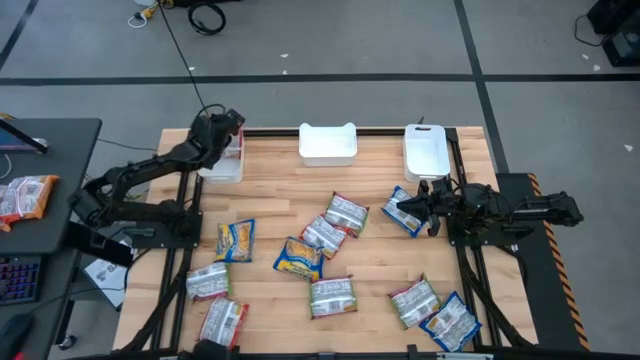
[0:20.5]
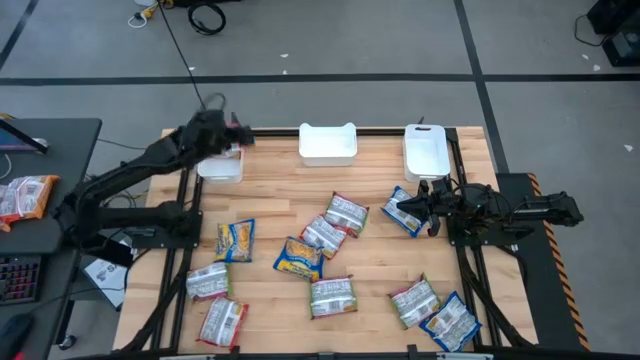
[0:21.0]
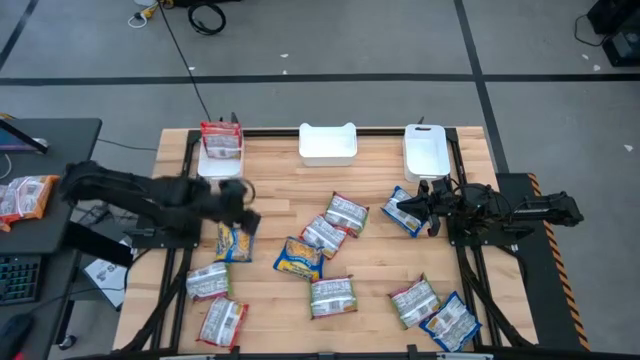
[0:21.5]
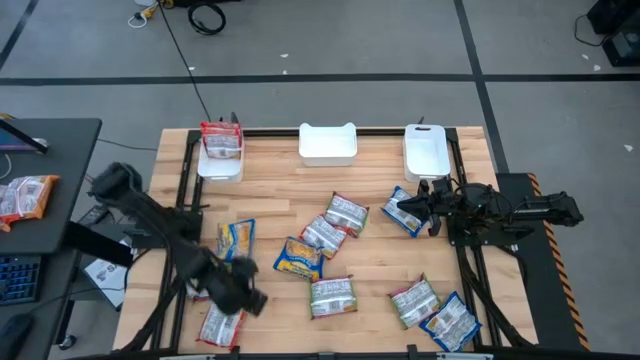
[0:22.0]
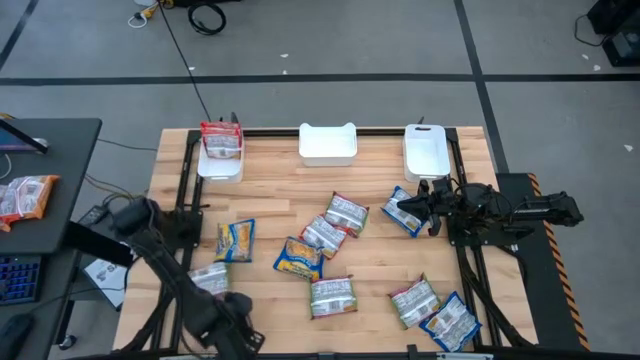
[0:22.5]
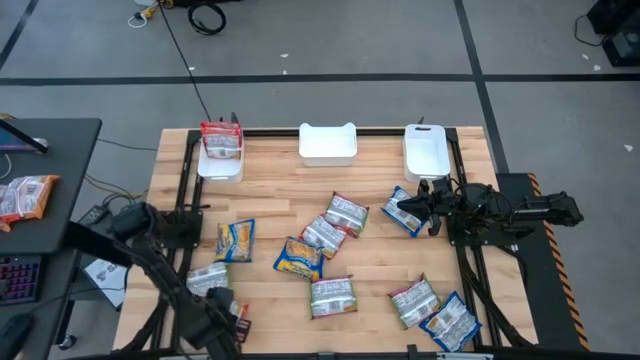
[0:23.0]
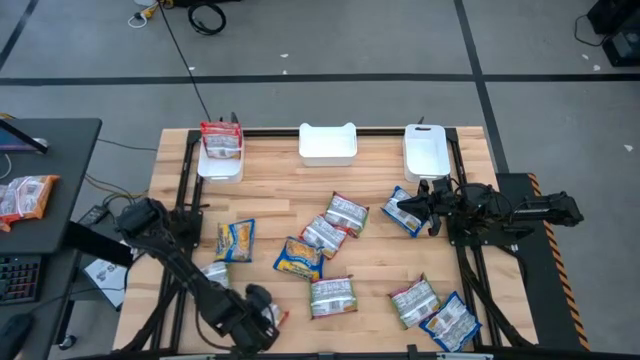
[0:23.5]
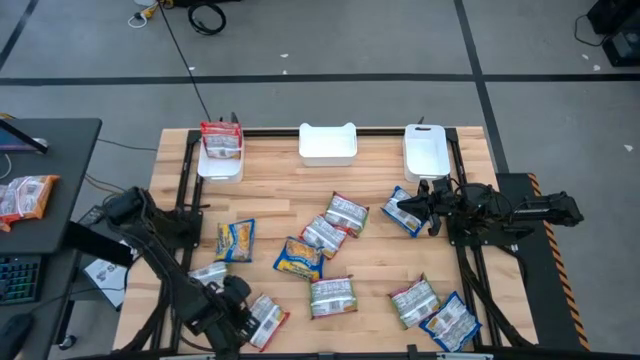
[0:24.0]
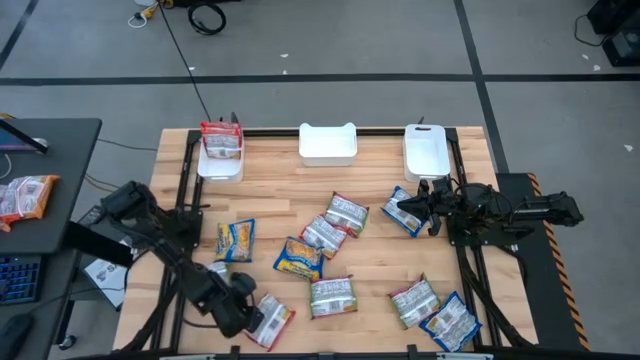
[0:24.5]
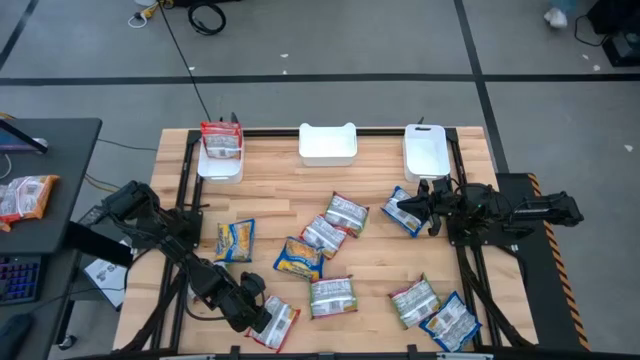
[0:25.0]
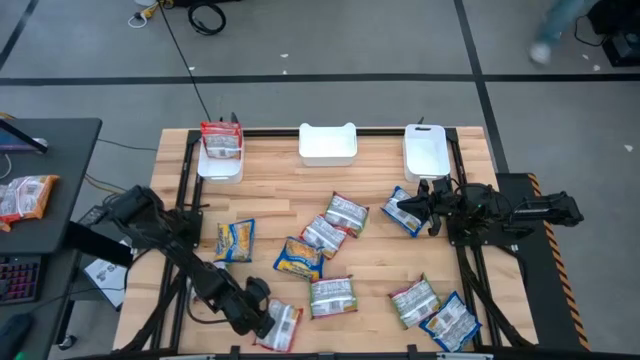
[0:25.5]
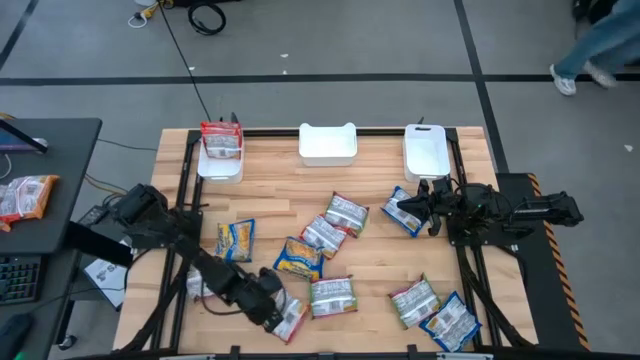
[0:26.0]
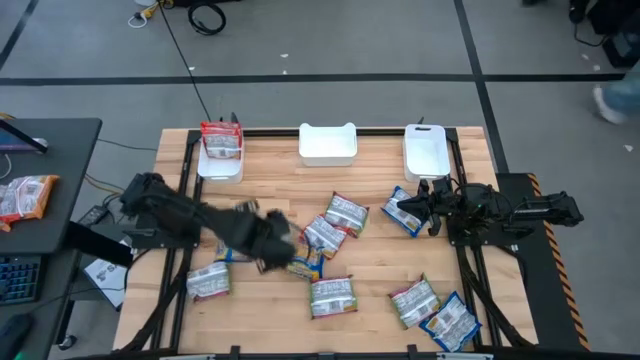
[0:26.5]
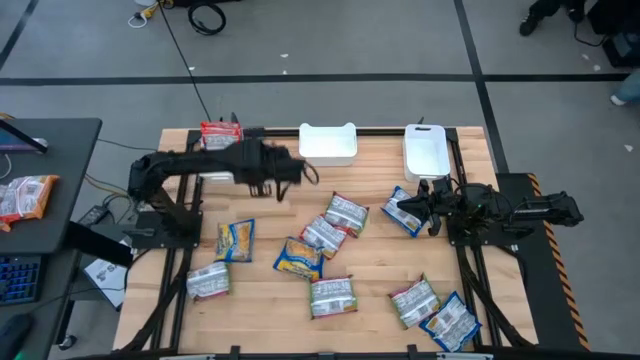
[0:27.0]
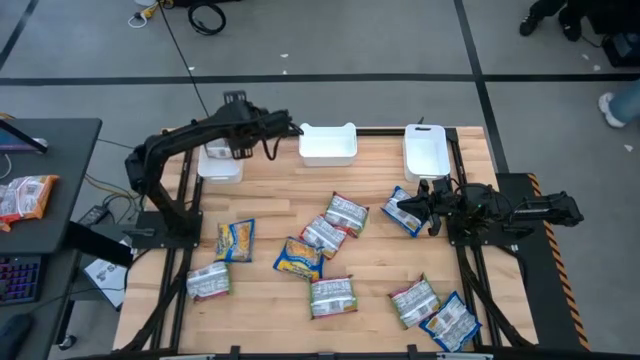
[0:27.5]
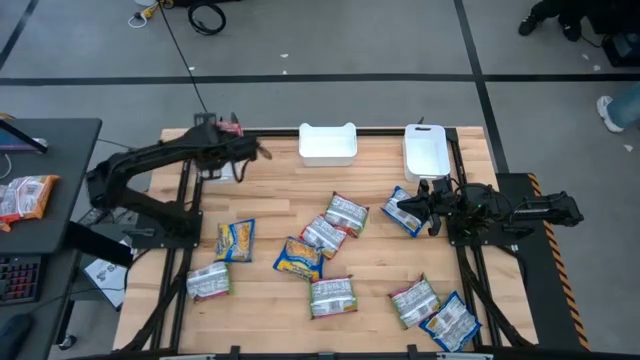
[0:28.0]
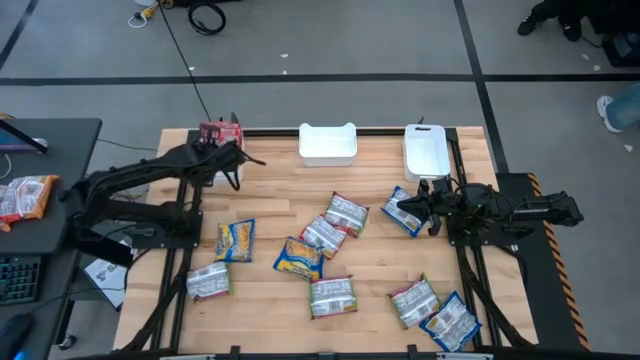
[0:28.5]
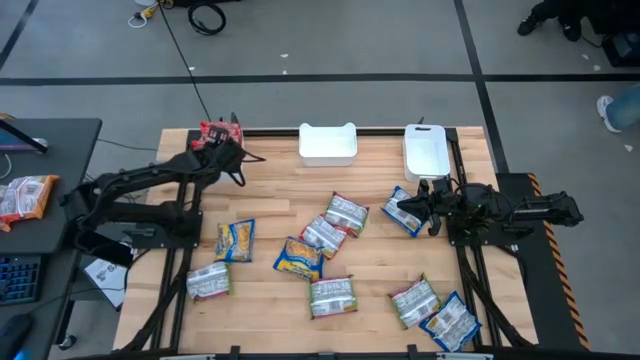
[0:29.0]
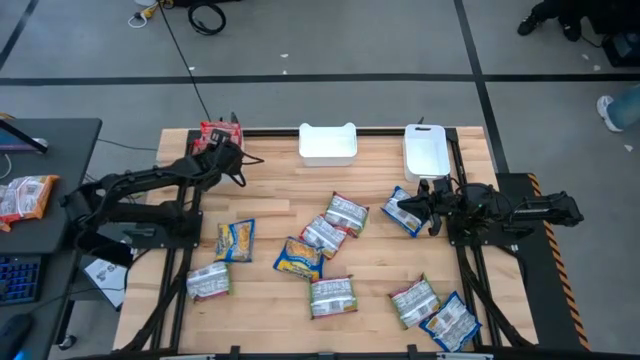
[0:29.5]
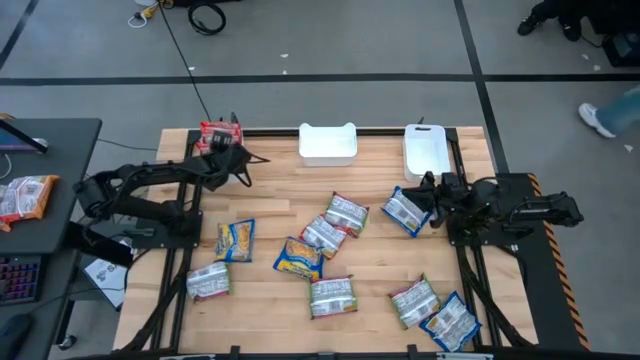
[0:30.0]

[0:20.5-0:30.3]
Task: Sort Maruchan noodles
Put the orange noodle pack into the left white bin

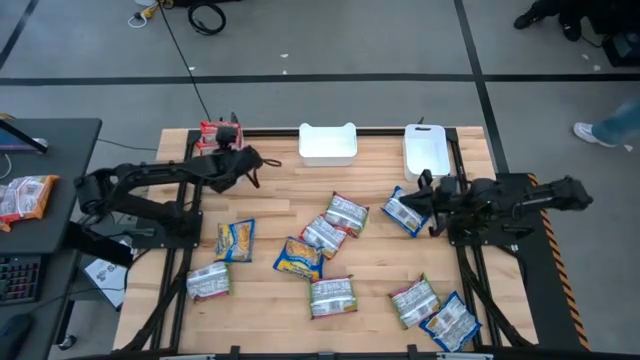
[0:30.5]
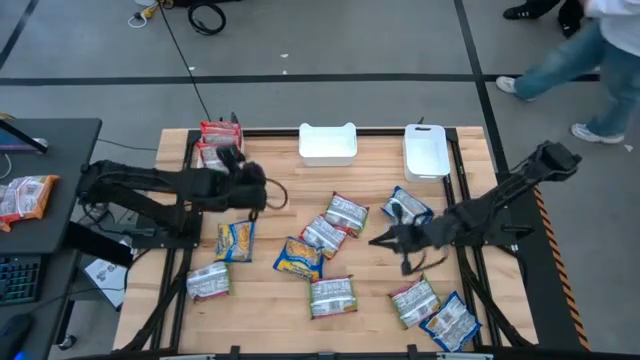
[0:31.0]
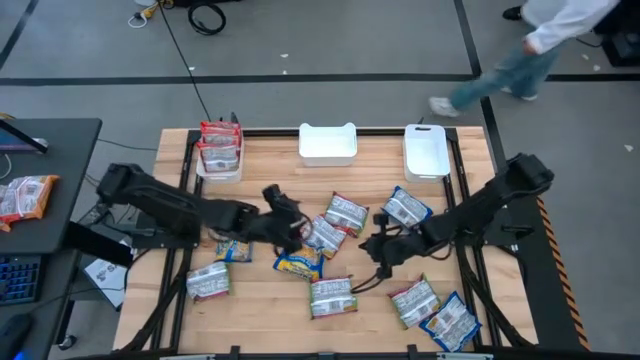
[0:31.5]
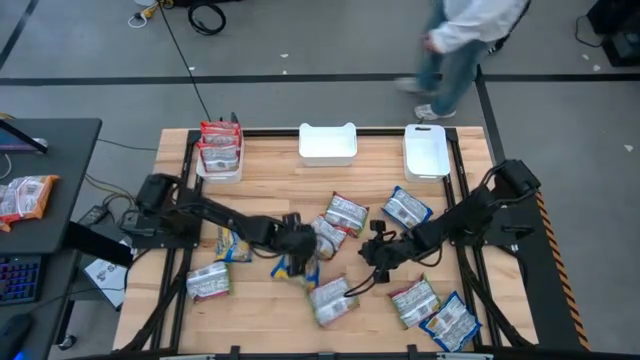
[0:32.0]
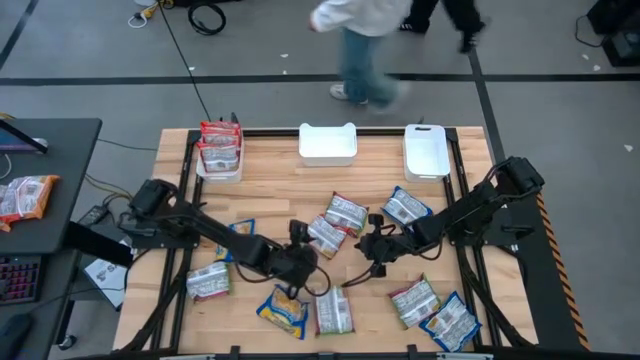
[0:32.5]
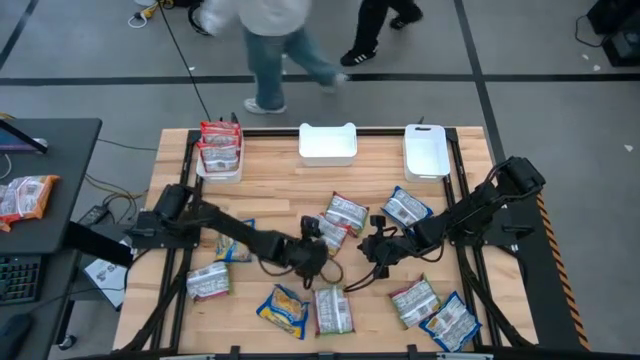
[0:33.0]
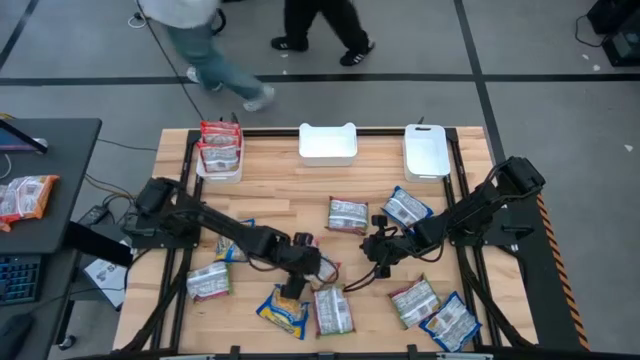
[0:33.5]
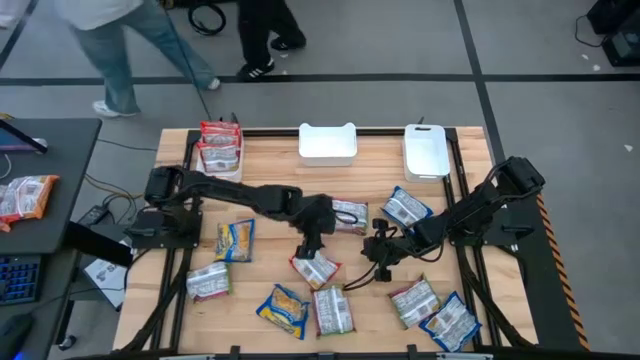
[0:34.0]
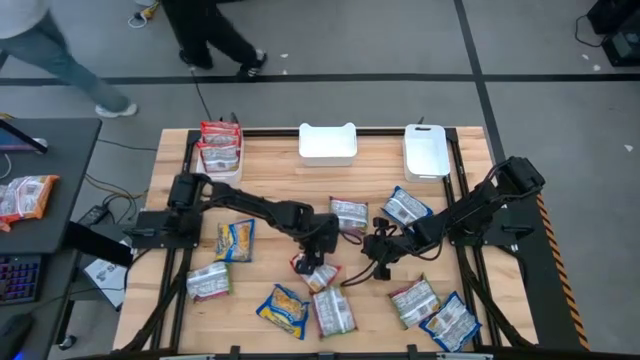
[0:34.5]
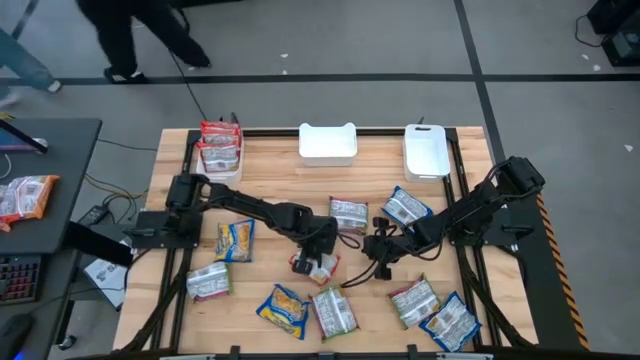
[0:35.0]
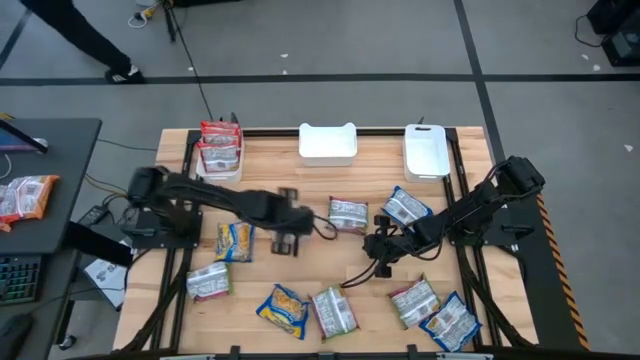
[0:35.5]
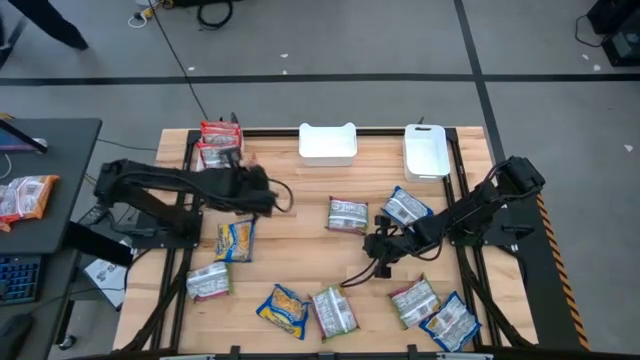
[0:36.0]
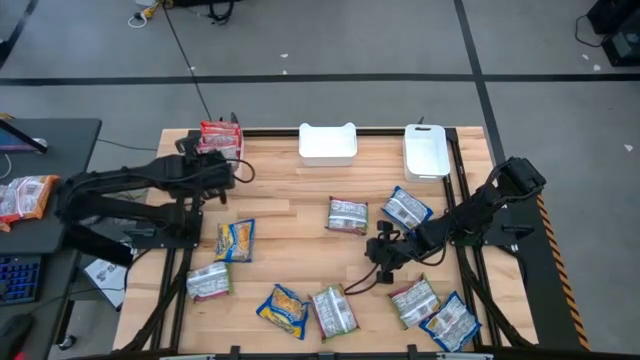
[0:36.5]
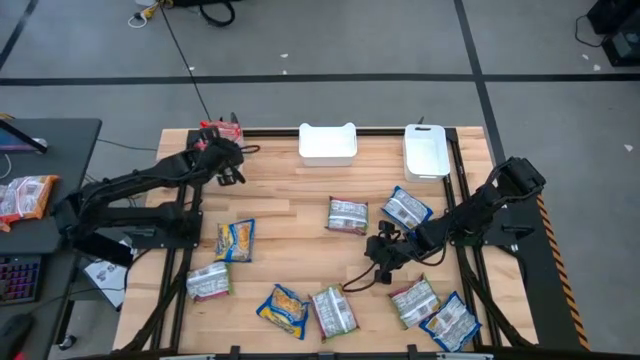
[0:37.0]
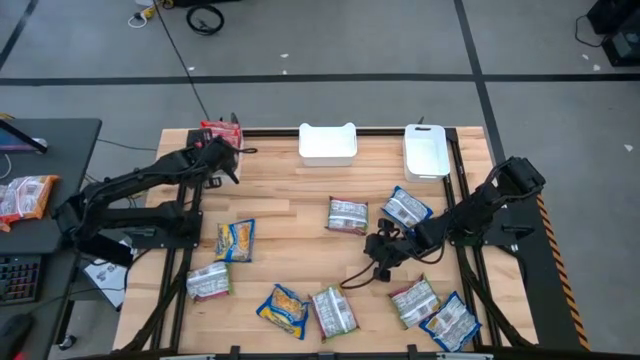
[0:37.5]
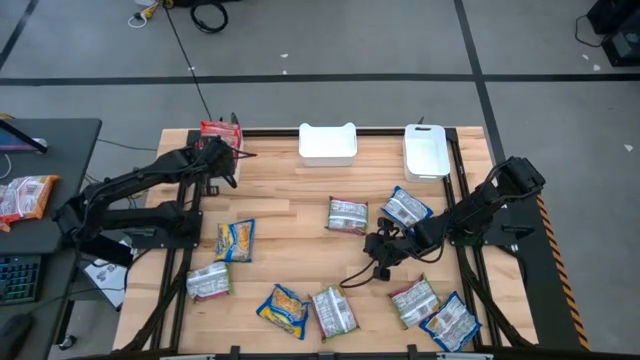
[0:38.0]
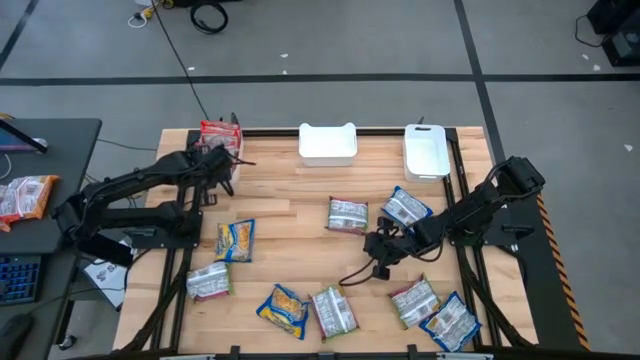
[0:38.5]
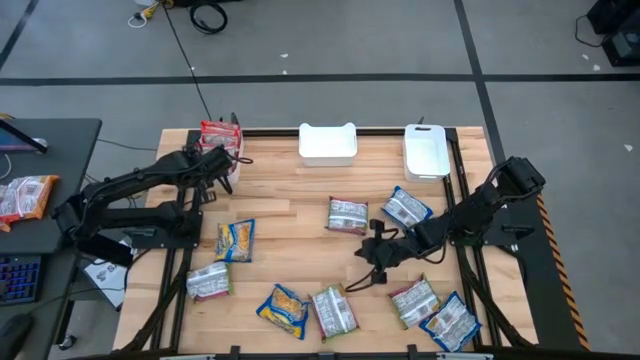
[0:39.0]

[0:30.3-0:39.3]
Put the orange noodle pack into the left white bin

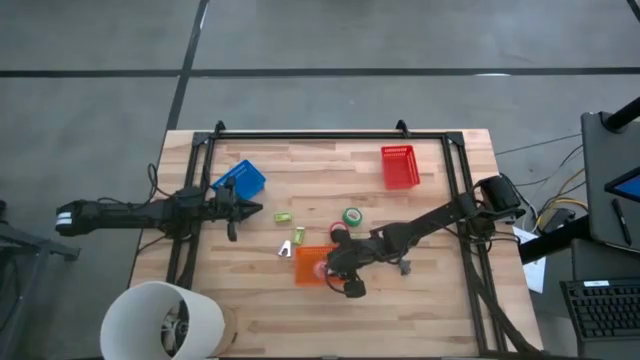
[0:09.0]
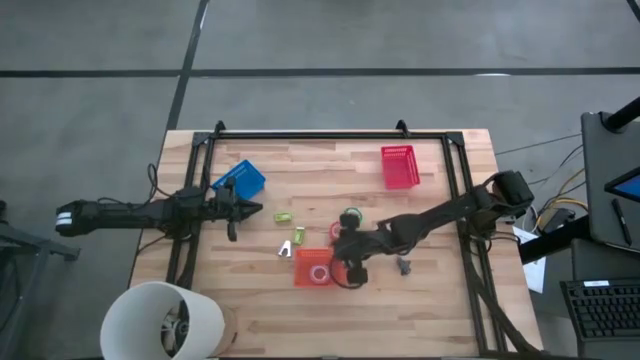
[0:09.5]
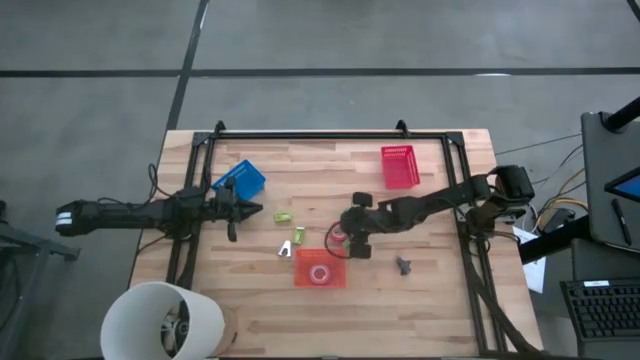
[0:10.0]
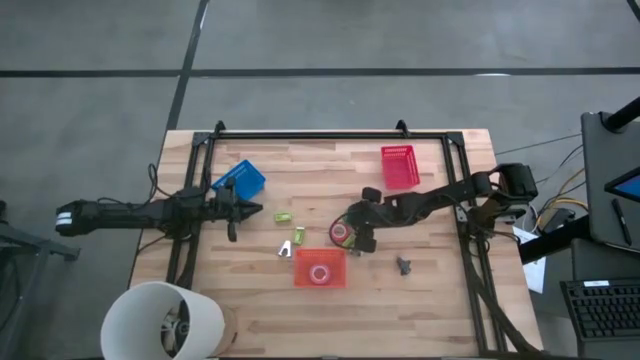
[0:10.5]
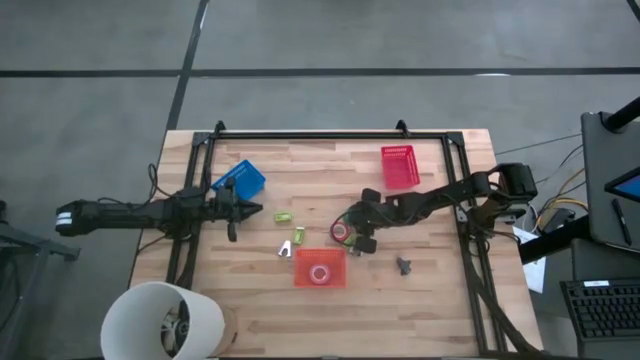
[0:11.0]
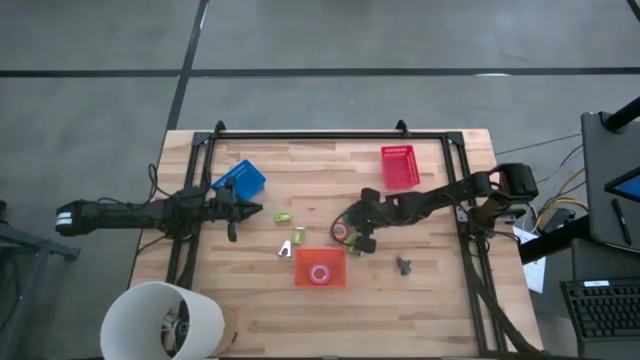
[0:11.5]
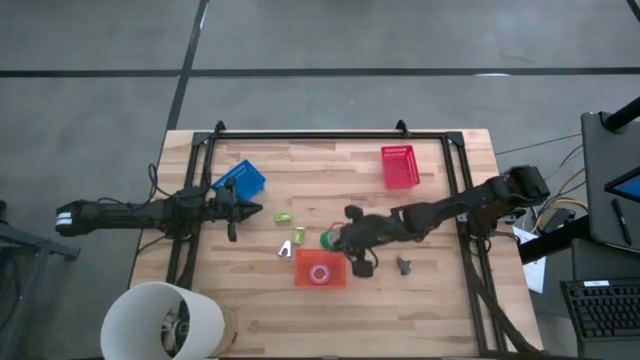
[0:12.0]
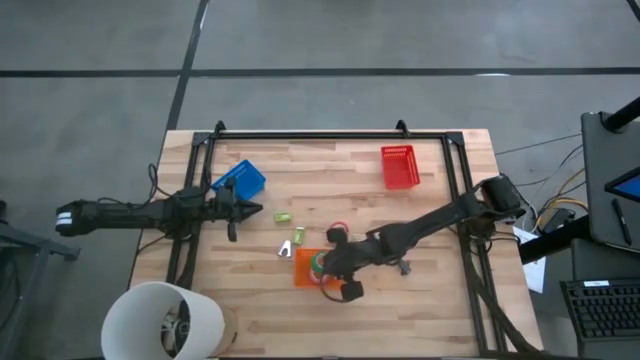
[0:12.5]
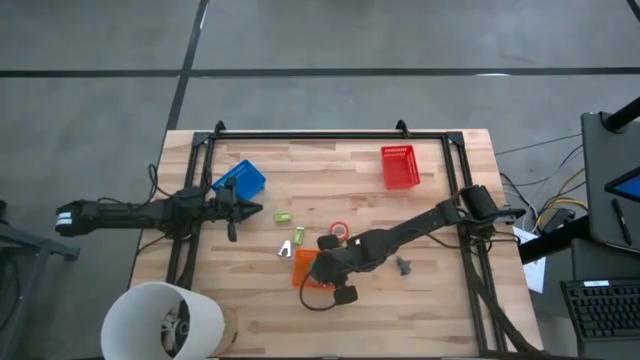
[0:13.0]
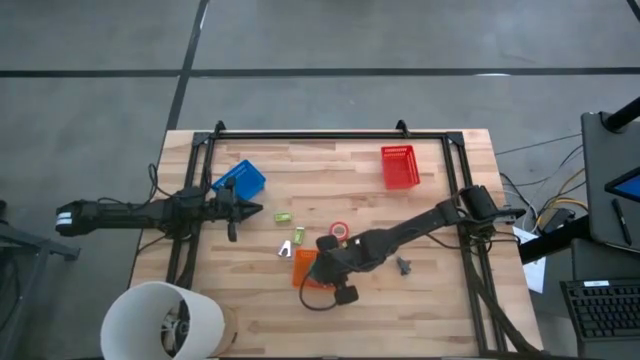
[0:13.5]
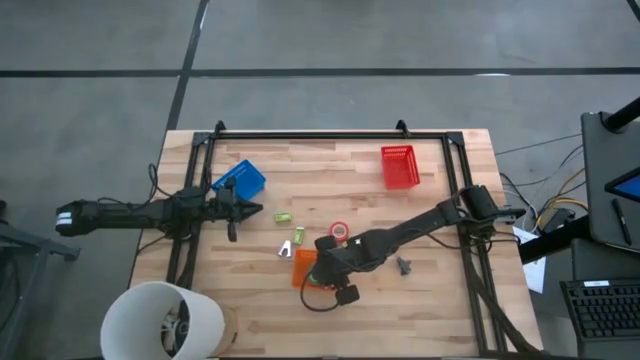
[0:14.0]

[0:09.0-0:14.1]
Task: Pick and place Stapler, Stapler remover, tape
Put the green tape into the orange bin
